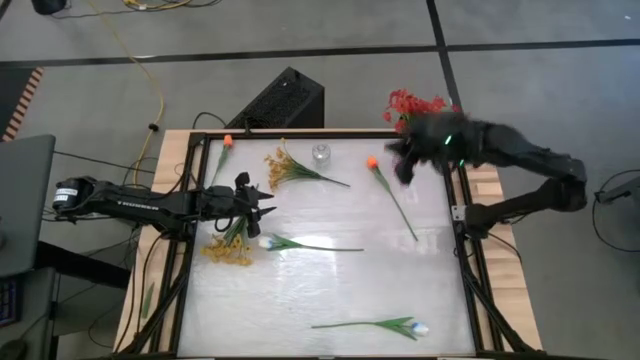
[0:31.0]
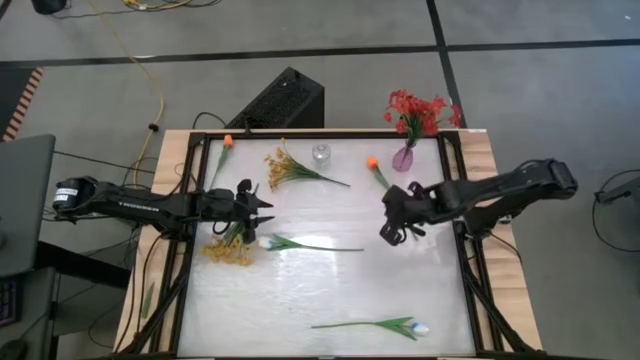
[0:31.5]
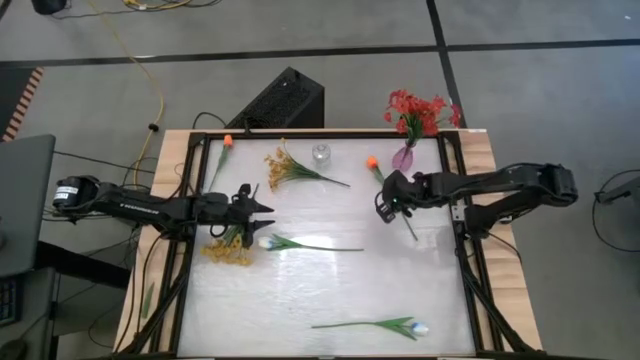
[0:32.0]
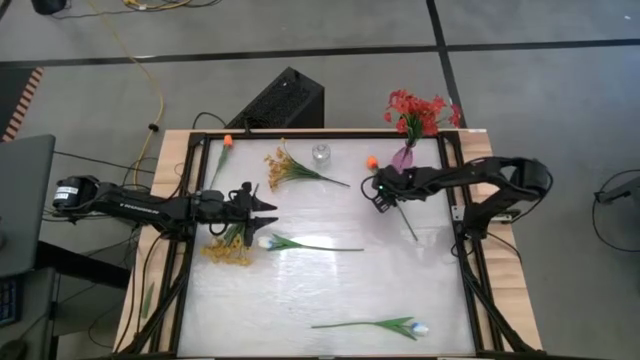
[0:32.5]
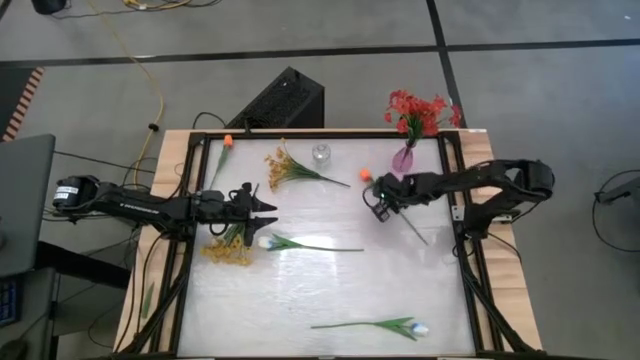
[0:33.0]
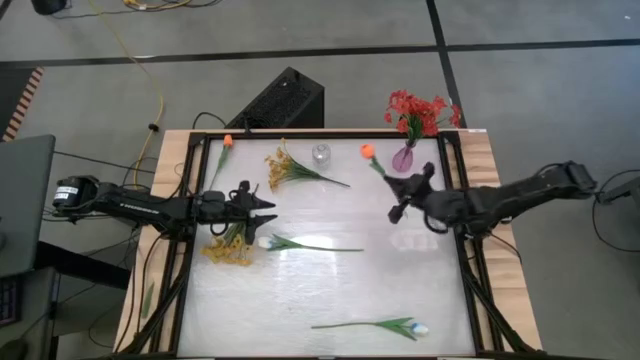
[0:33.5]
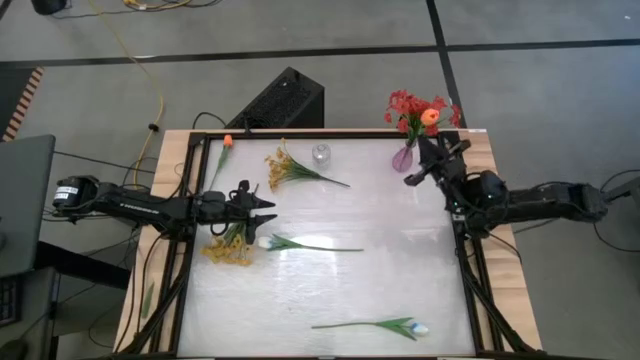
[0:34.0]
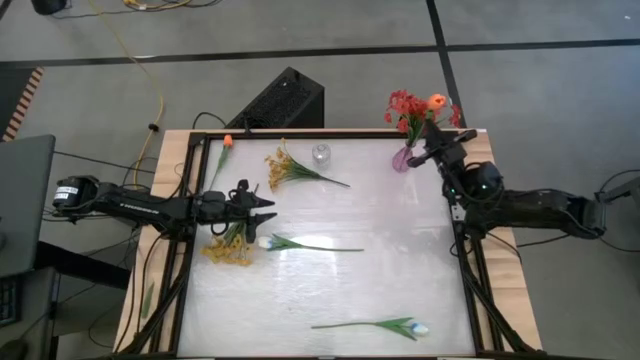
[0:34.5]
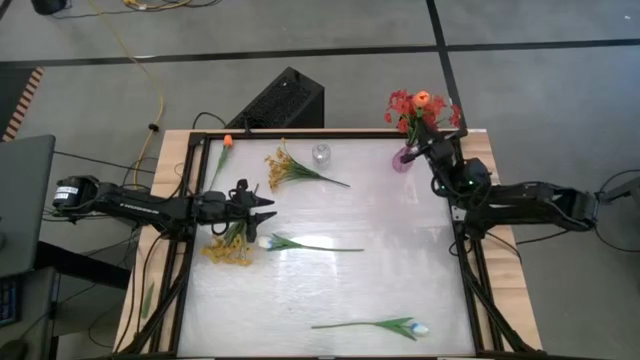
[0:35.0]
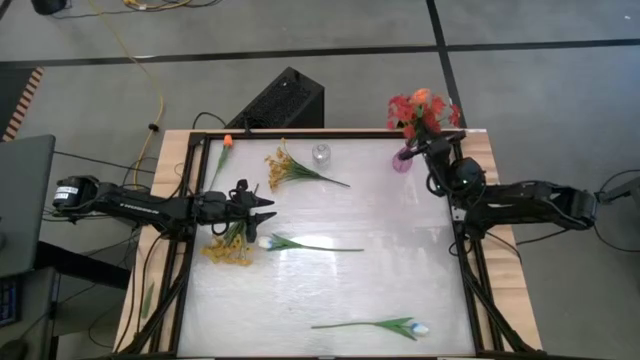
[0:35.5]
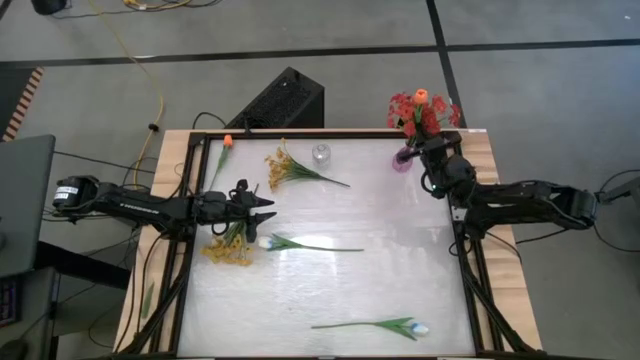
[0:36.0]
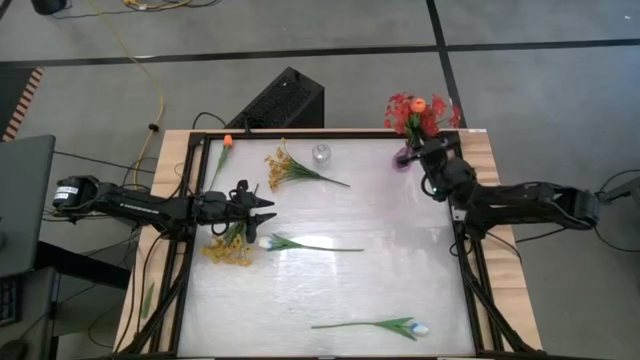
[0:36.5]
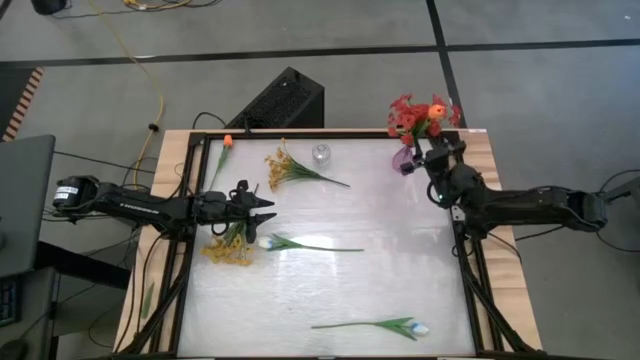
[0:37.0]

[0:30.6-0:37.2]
Task: Sort flowers into vase by color
Put the right orange tulip into the purple vase
